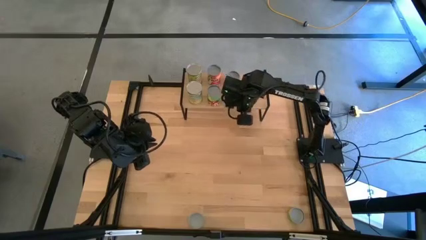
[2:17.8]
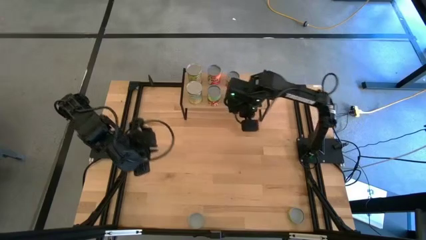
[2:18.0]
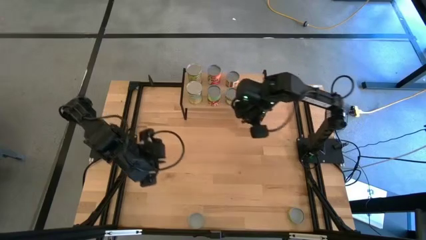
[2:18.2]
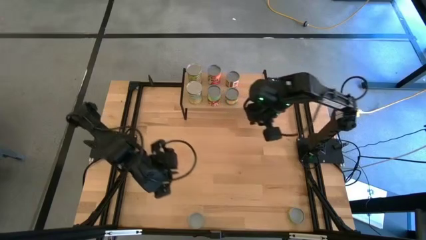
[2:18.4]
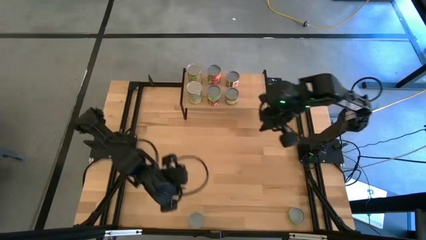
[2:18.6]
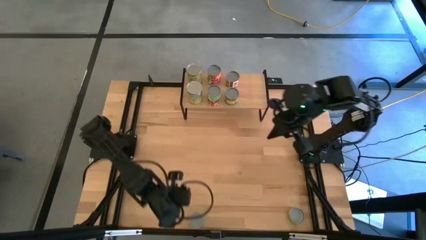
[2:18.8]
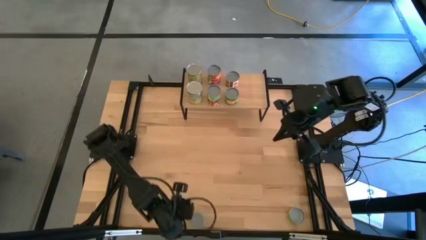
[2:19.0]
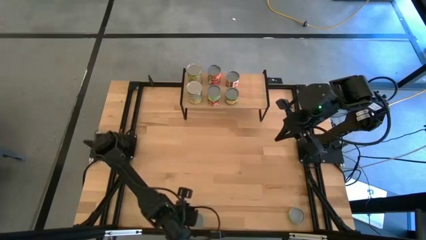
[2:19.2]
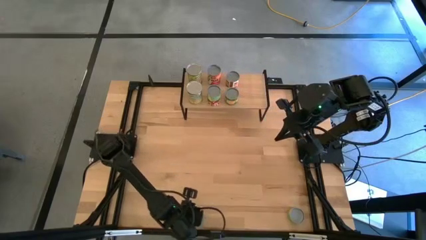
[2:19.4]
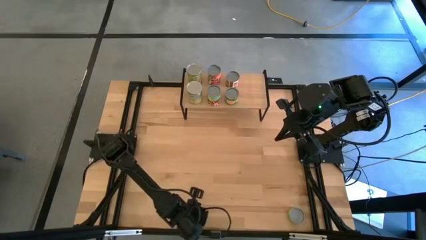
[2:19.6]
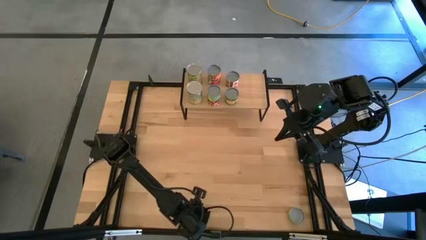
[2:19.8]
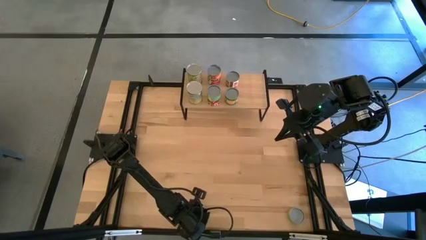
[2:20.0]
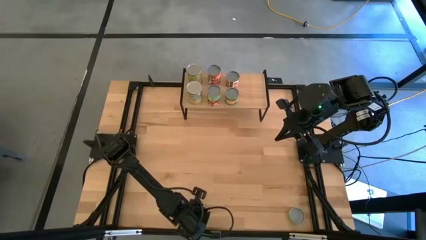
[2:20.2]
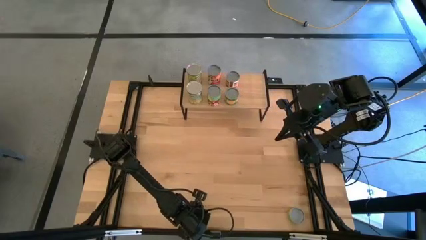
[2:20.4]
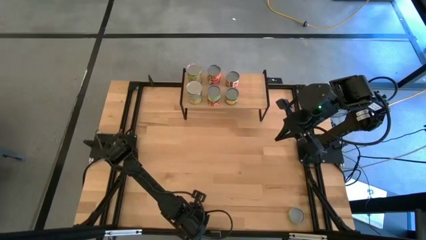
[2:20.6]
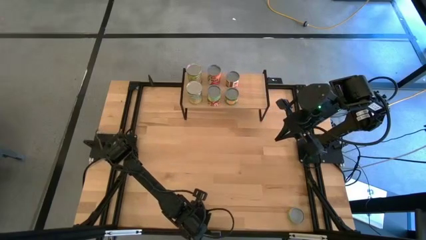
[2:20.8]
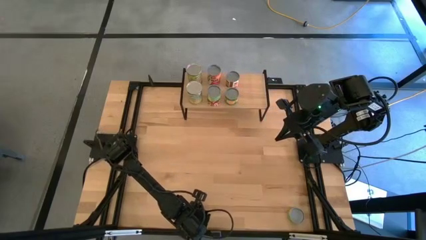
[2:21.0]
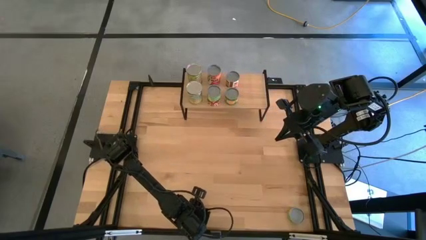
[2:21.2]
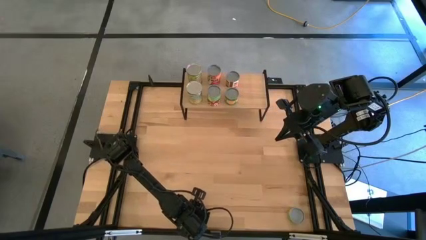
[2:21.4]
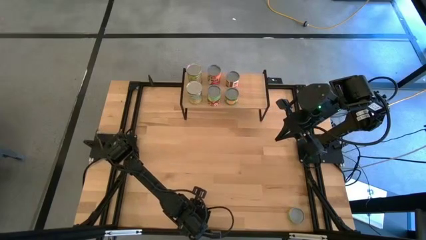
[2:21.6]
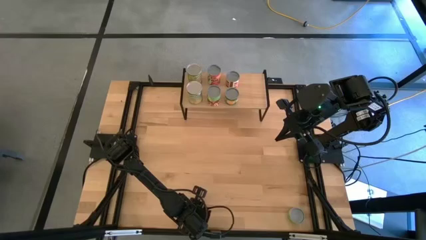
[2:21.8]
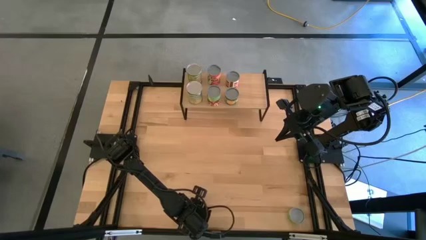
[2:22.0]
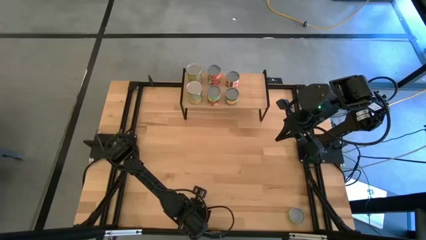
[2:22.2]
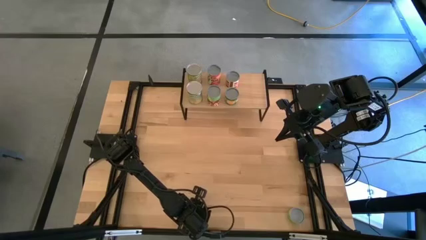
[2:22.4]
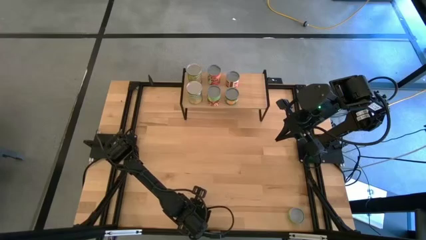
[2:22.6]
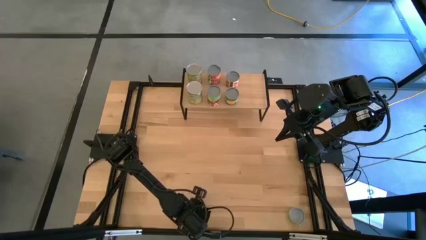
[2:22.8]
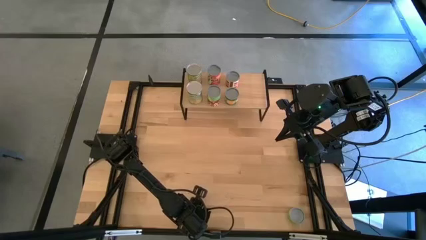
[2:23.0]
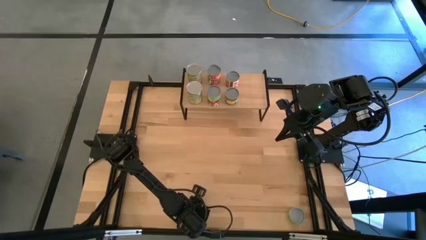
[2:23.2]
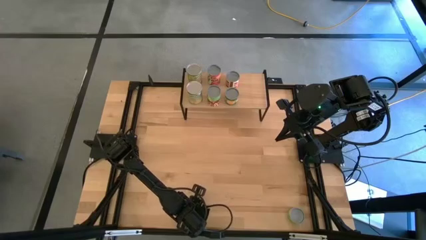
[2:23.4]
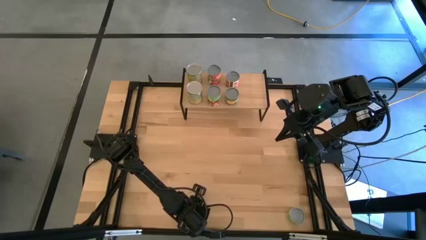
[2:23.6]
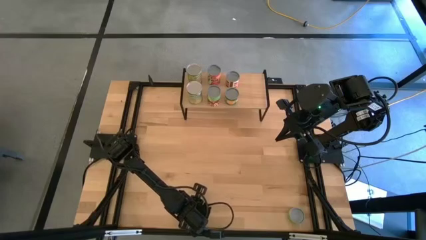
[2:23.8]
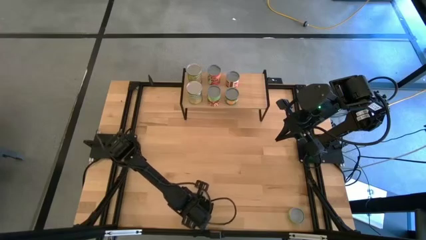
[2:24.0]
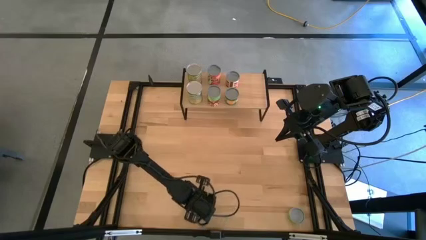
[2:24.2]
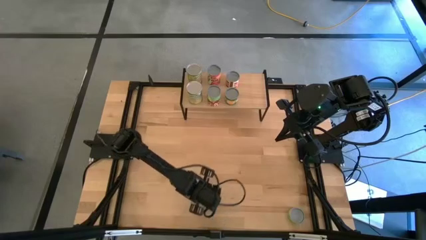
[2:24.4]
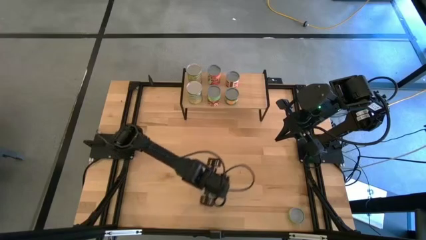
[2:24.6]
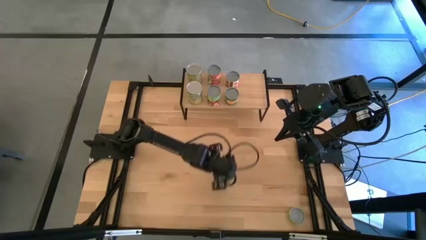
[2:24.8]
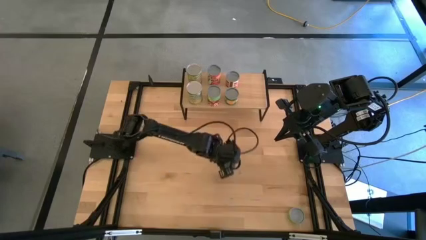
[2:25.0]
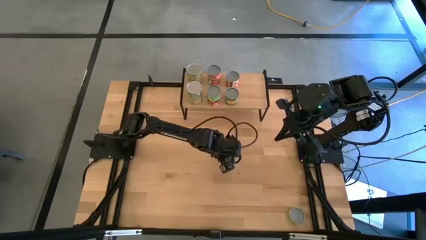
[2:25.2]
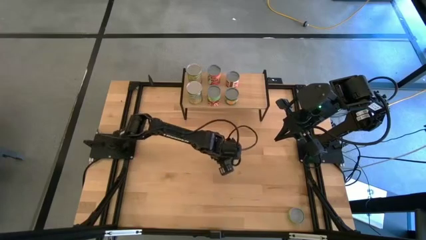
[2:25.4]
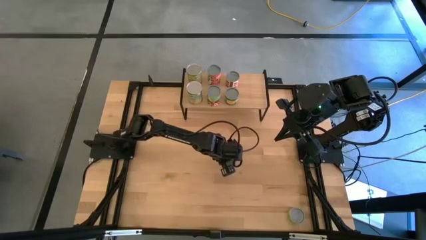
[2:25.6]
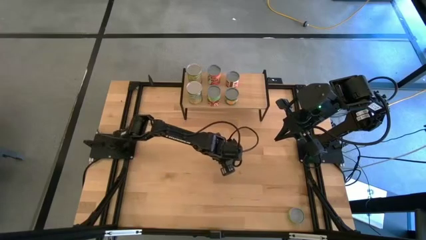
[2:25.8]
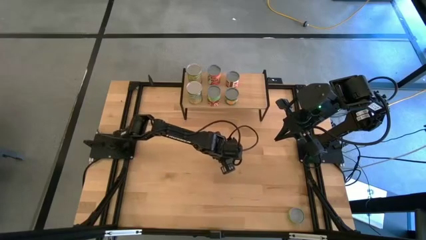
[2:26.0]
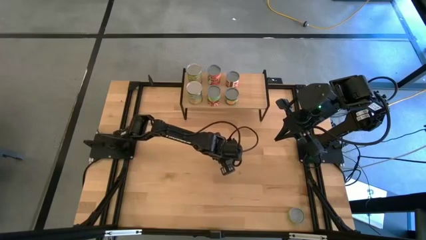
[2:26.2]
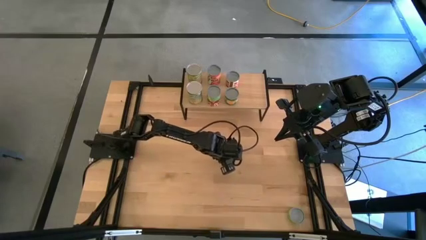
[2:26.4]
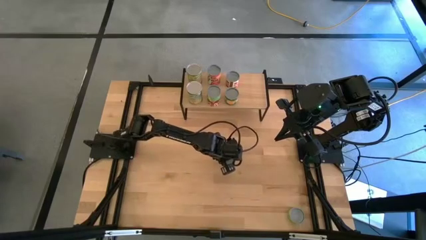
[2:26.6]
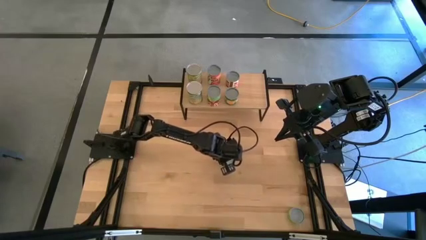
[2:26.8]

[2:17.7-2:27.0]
Task: Pick and place cans onto a shelf
Move the canned tuna to the center of the table

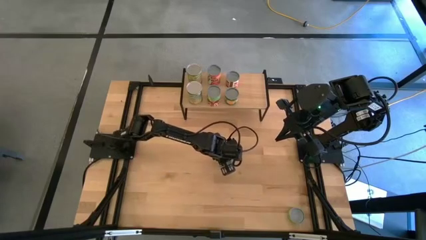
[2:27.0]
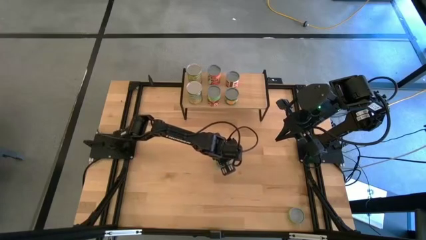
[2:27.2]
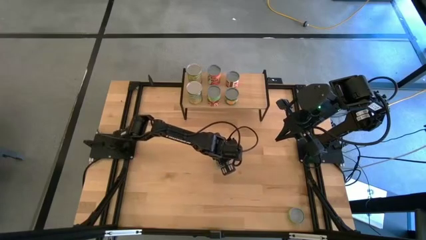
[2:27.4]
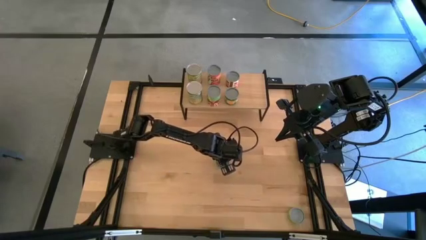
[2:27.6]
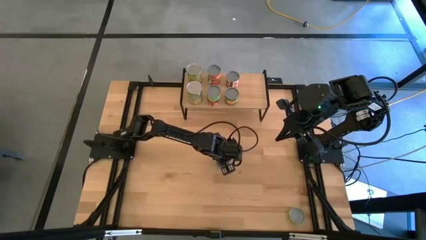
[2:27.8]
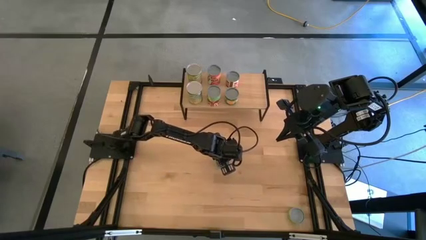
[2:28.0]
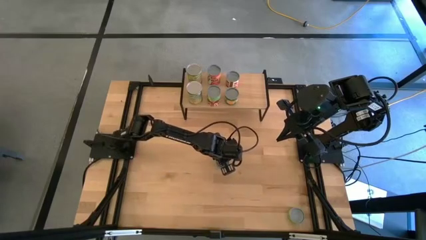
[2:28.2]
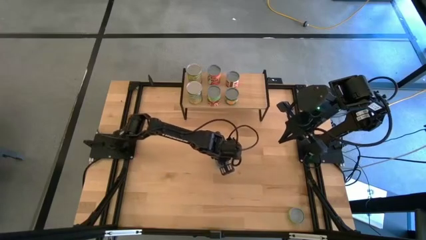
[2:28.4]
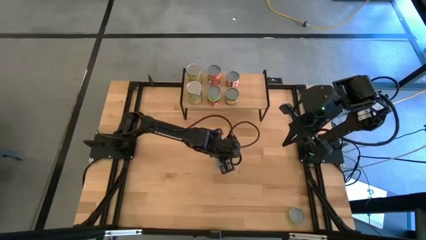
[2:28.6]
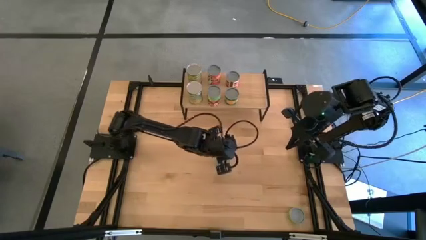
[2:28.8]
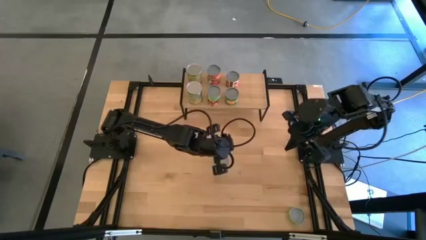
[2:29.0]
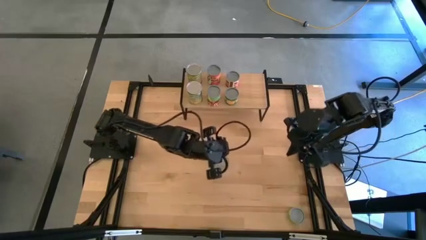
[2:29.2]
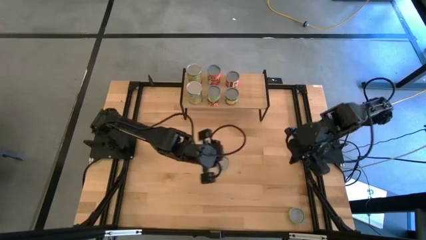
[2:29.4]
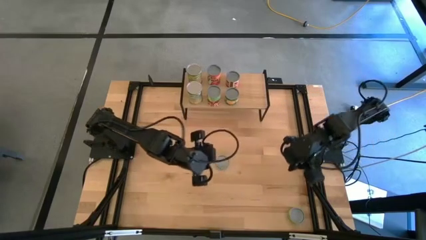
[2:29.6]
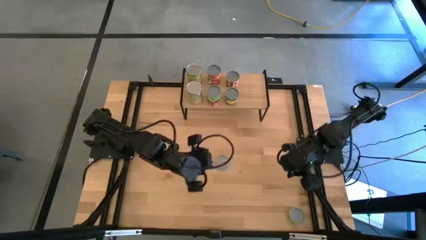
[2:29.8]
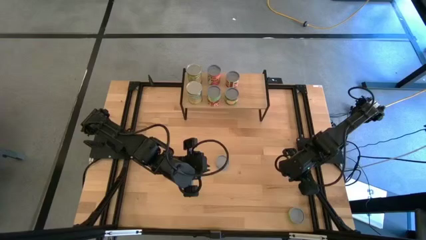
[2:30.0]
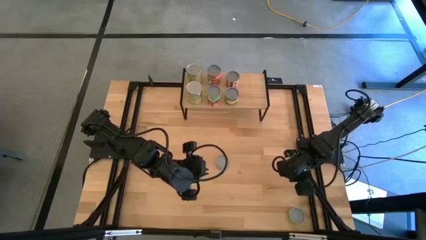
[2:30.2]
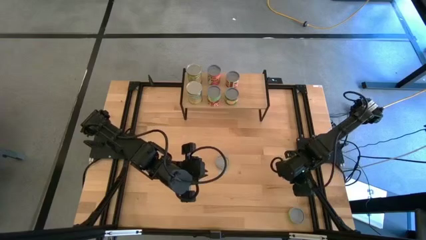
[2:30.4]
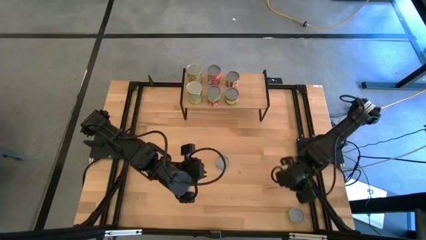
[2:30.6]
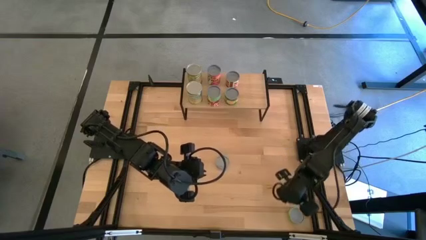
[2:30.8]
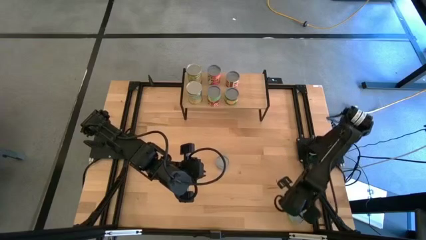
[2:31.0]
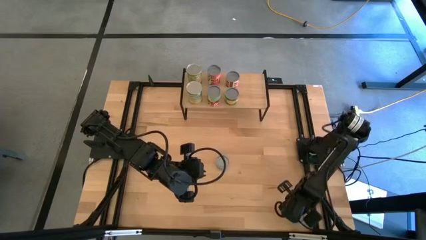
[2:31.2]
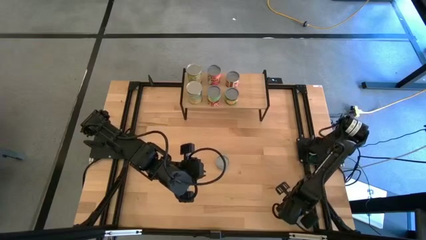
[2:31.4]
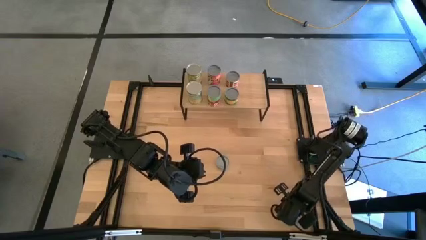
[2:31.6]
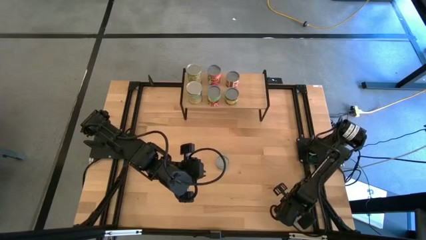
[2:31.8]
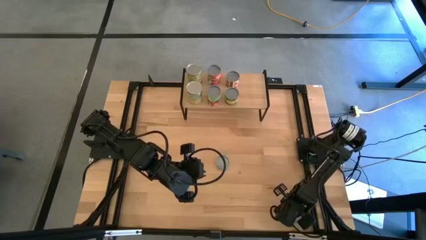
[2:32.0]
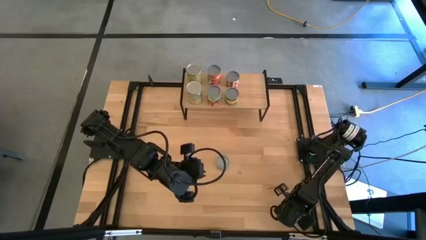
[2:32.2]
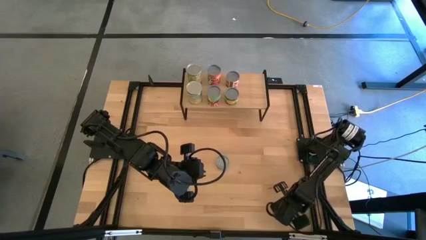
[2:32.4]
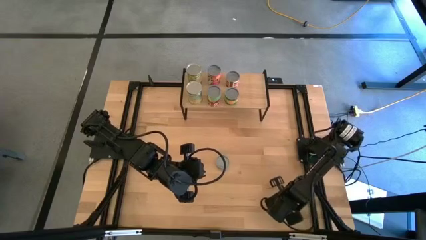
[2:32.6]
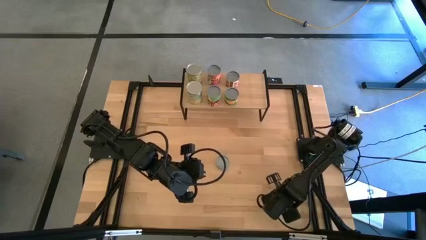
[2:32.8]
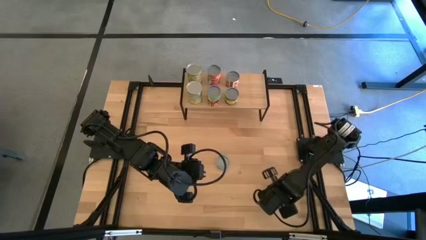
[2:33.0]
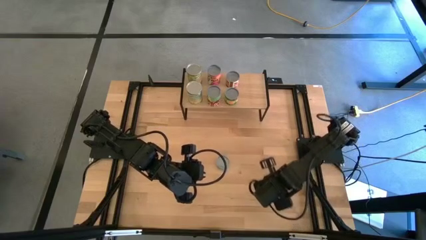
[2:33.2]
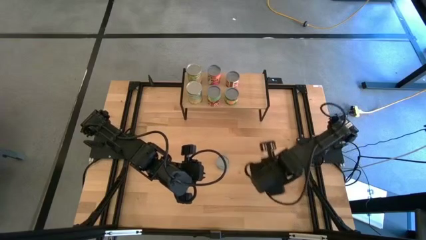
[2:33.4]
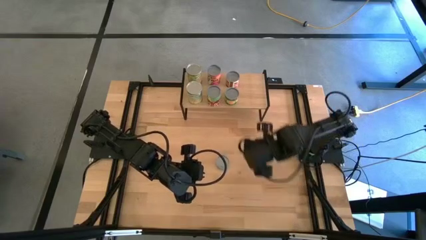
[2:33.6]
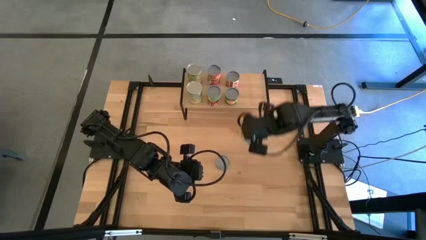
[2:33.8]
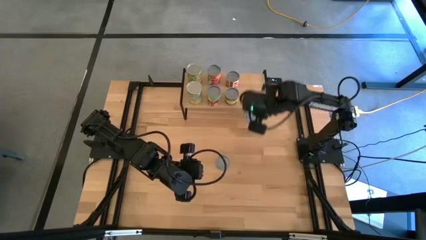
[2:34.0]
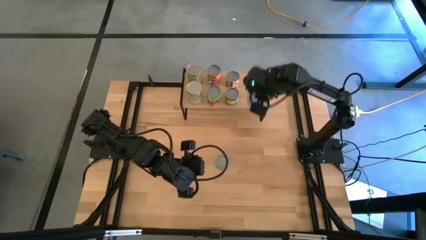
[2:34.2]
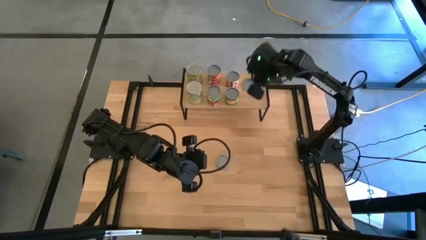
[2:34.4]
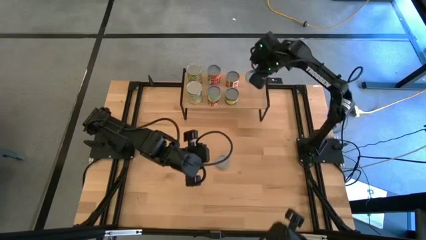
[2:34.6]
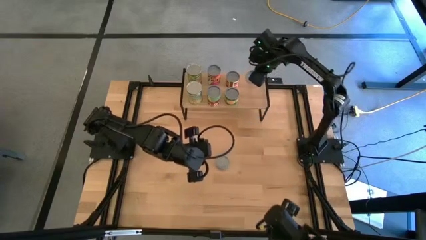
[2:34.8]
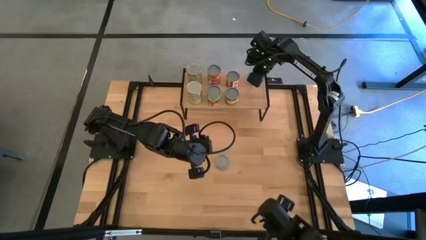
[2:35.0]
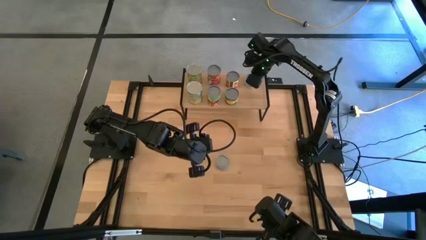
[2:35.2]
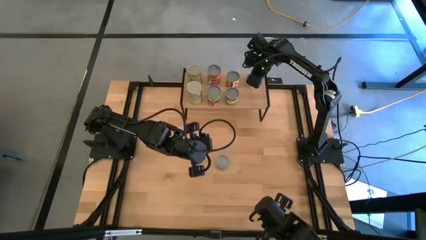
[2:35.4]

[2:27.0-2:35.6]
Put the canned mushroom on the shelf
